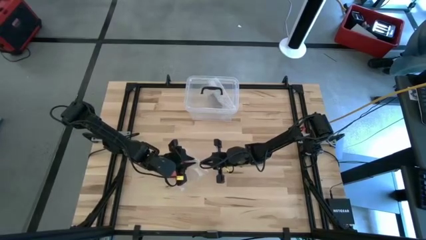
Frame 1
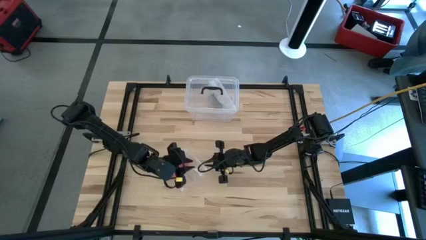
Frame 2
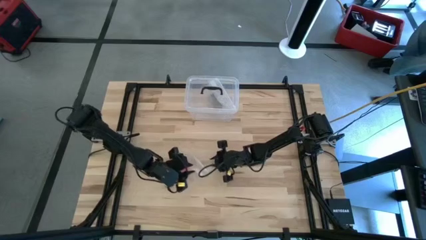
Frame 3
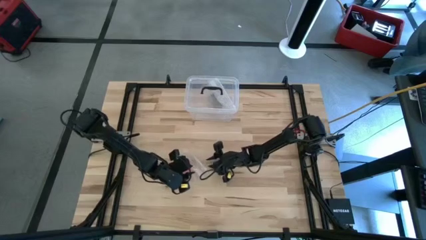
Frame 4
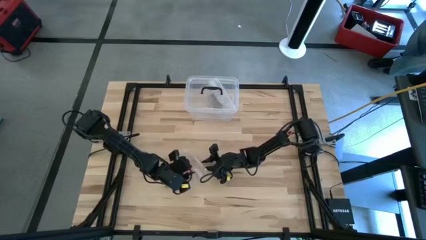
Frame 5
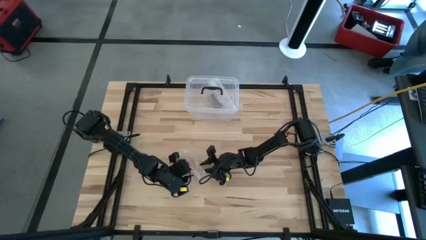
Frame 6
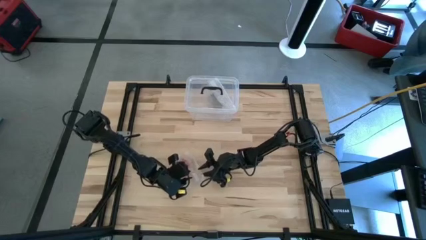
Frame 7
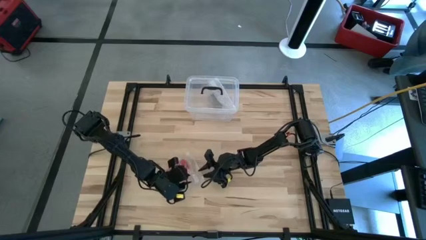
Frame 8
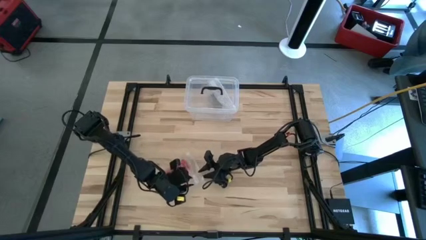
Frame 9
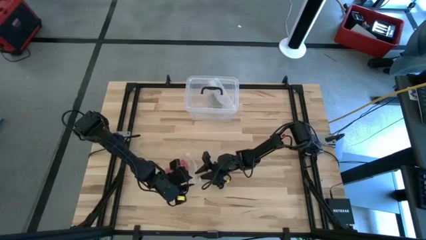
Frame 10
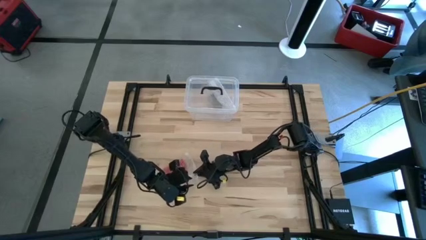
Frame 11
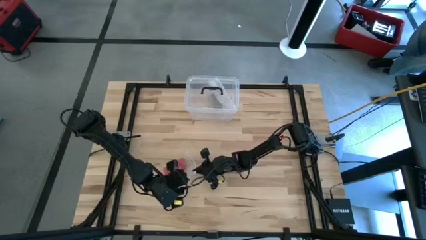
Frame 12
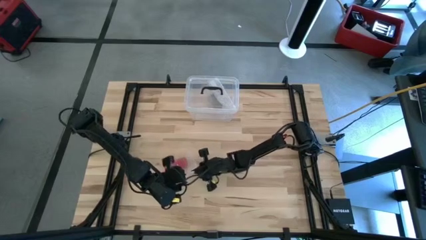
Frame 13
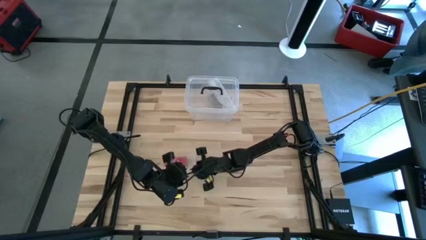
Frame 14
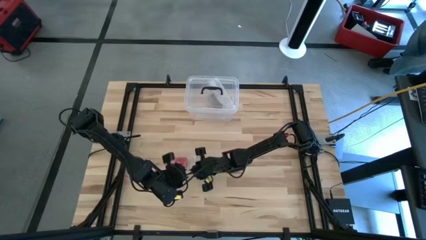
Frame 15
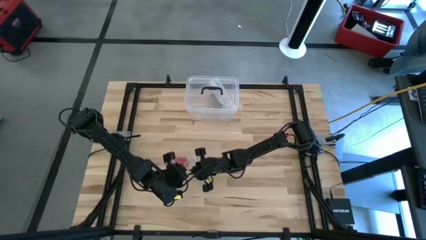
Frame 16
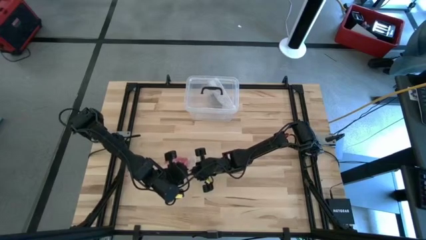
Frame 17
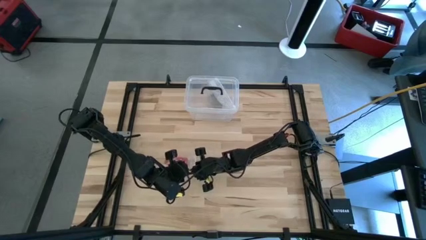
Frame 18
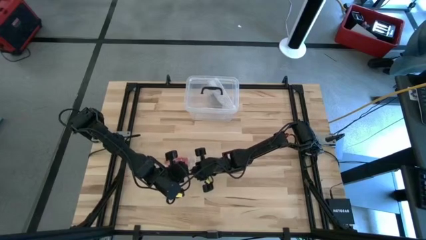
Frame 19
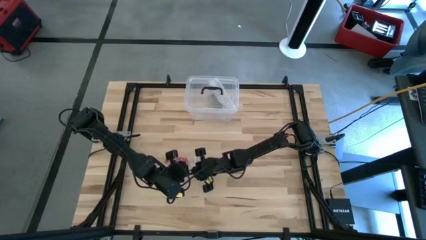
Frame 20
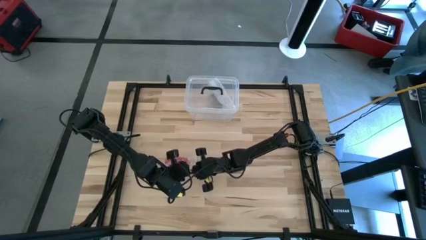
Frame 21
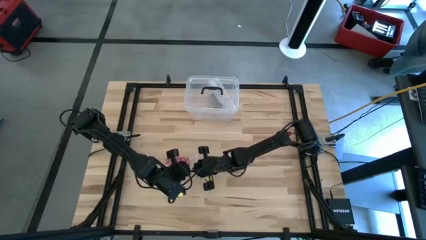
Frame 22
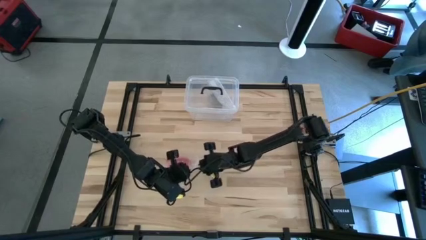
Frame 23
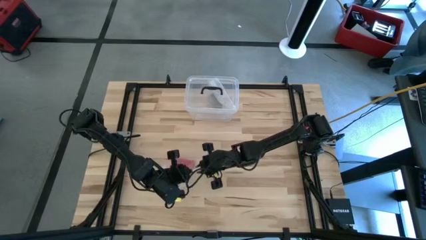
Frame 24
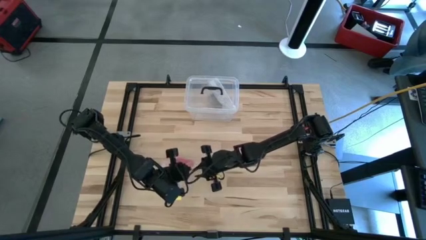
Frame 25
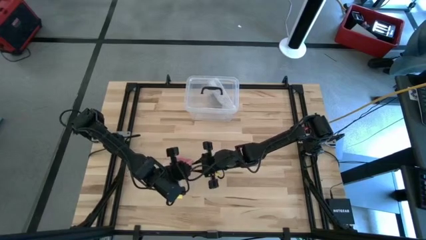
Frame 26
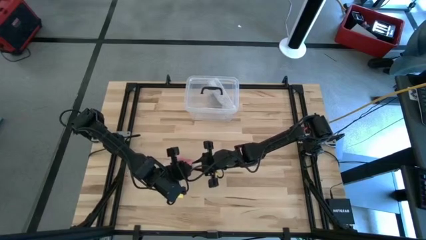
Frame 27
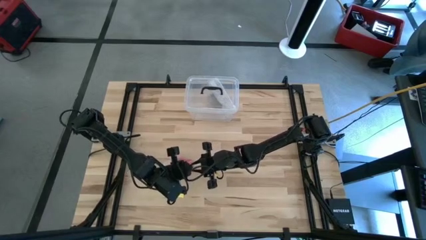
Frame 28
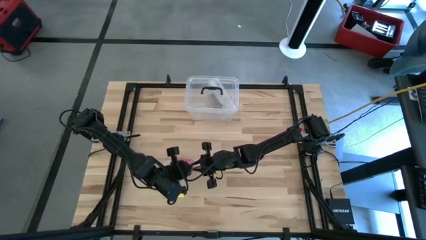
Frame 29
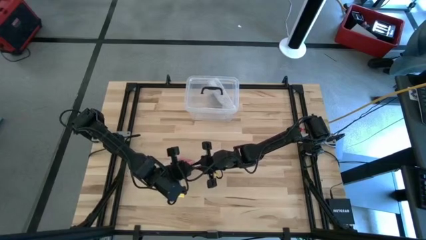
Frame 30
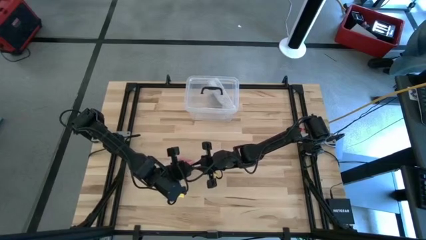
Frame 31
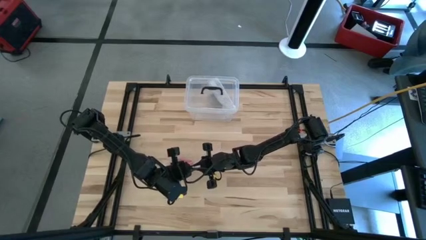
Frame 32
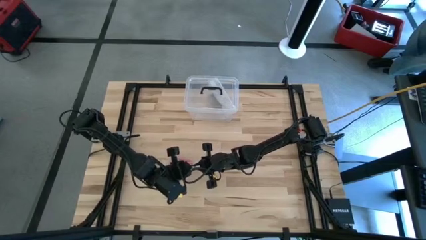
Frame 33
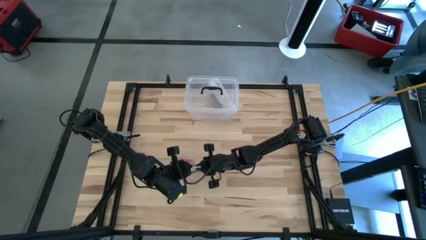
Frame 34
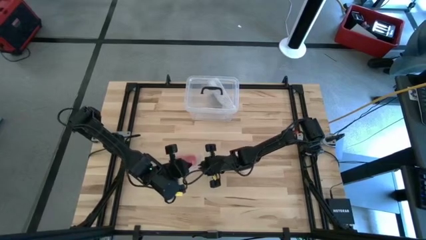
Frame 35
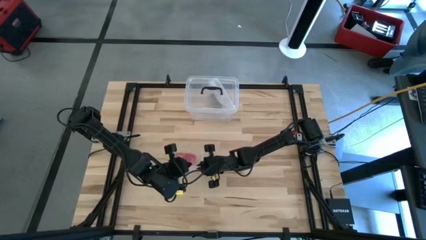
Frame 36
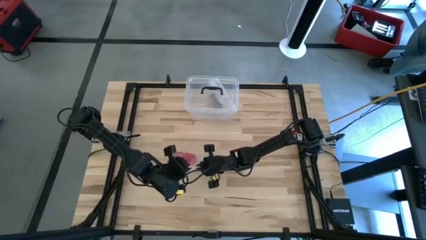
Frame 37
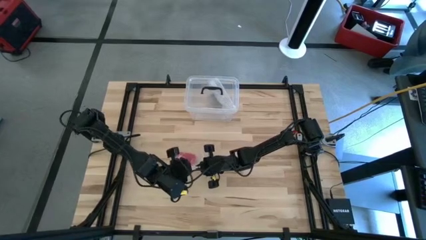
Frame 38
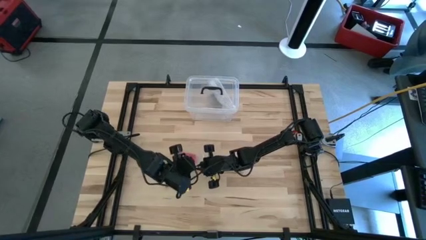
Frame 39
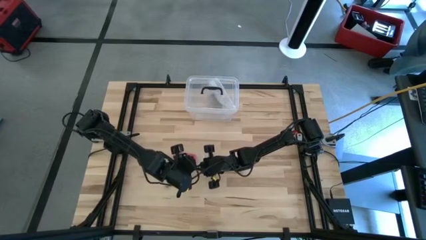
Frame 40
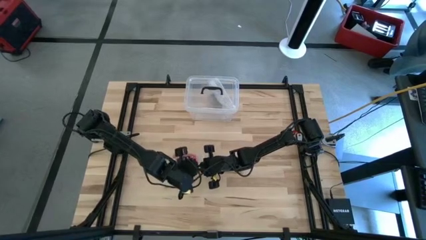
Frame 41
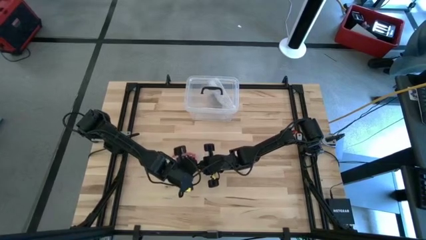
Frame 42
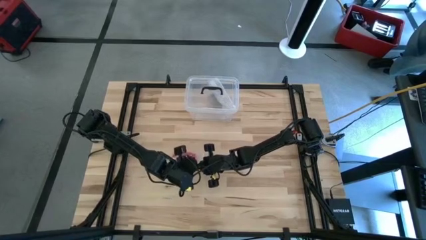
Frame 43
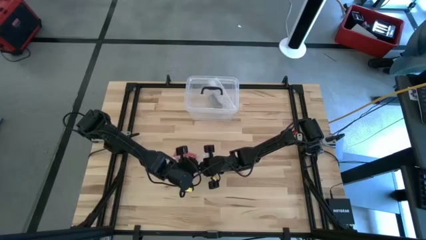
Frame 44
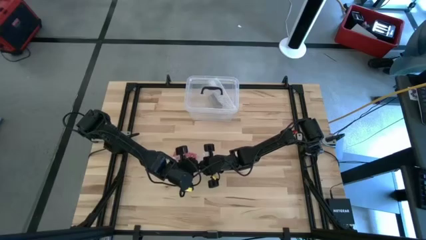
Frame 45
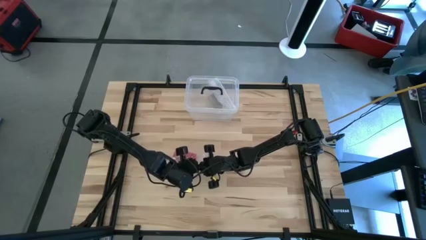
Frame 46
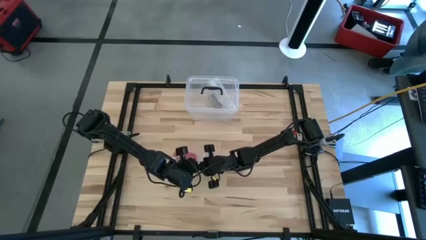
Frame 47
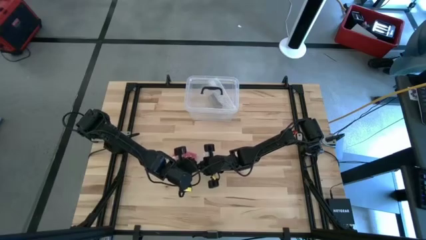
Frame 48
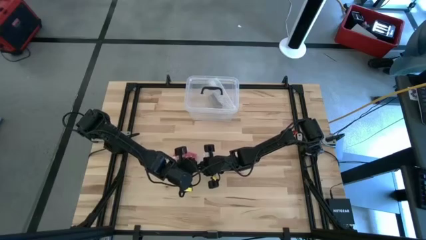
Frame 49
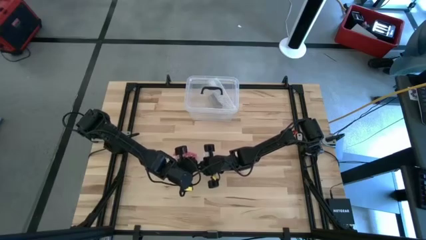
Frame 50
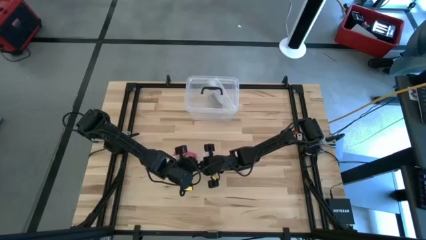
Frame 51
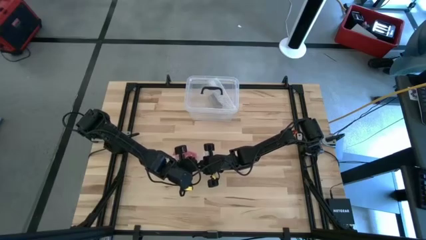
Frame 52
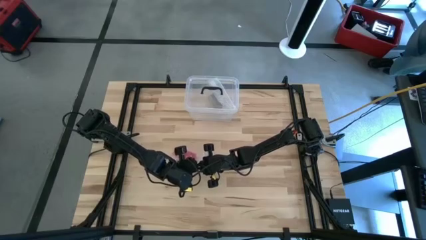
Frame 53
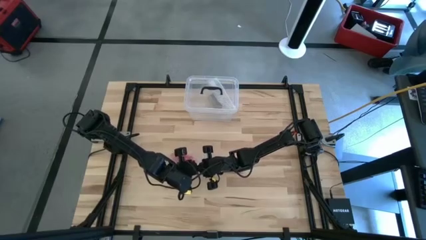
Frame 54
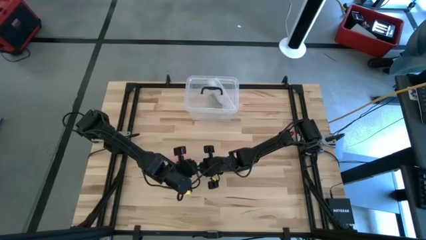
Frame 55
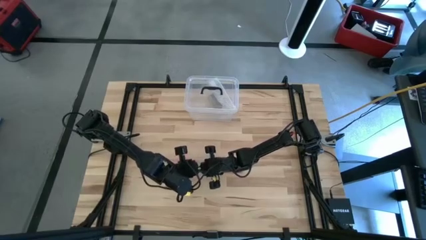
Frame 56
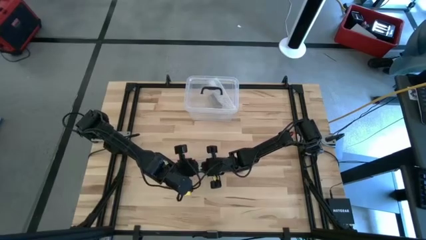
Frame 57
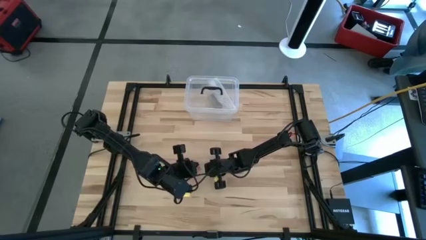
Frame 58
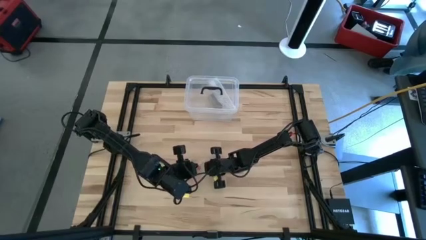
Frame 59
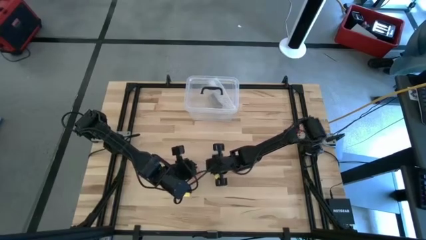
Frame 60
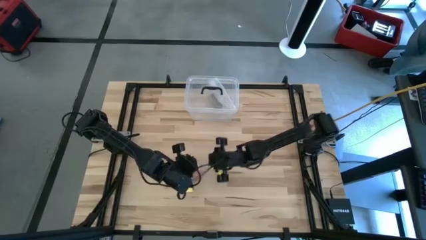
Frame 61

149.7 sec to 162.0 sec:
Task: Roll bandage
Close the transparent zip bag

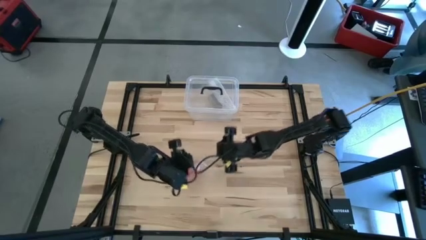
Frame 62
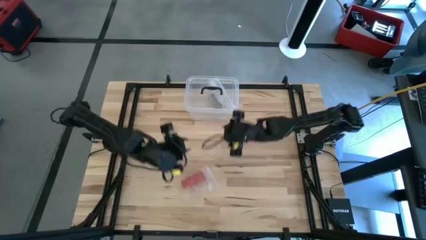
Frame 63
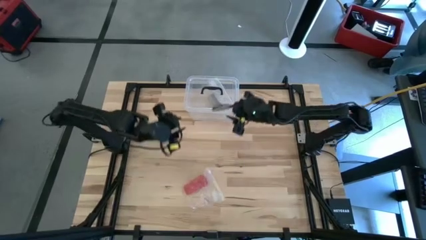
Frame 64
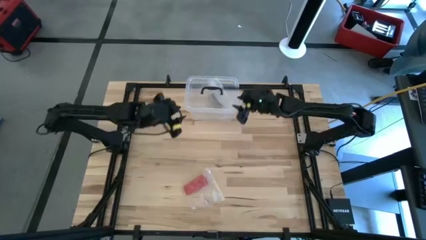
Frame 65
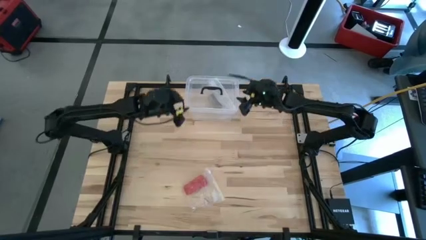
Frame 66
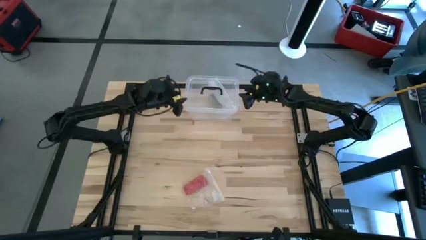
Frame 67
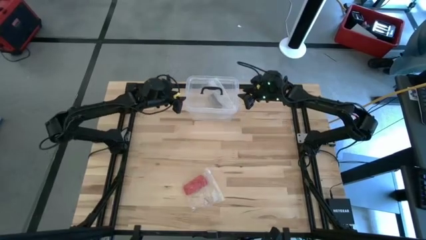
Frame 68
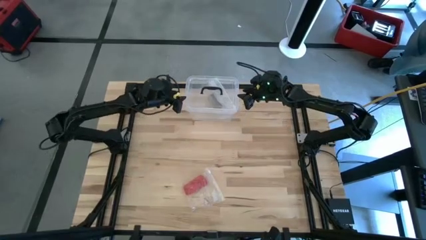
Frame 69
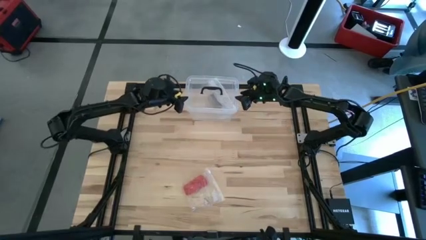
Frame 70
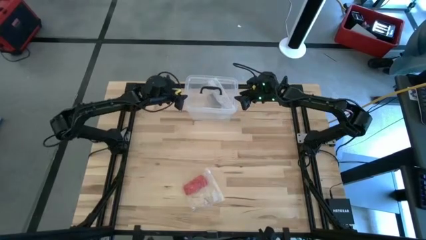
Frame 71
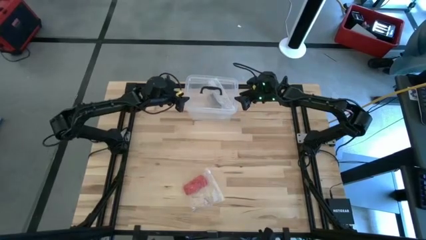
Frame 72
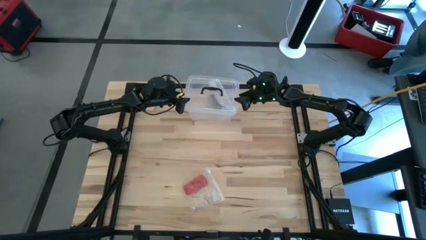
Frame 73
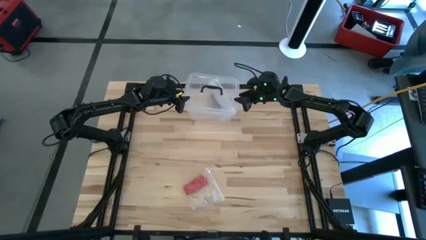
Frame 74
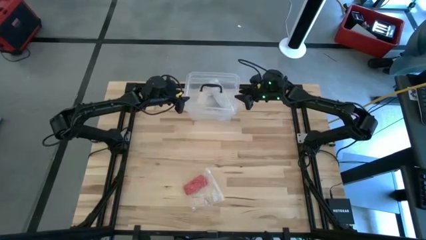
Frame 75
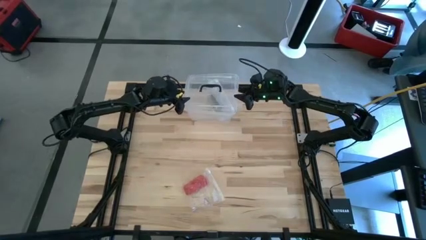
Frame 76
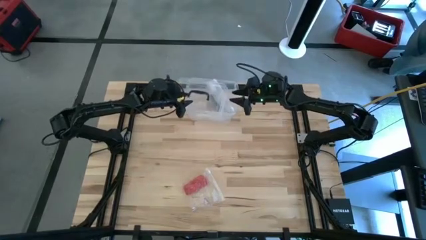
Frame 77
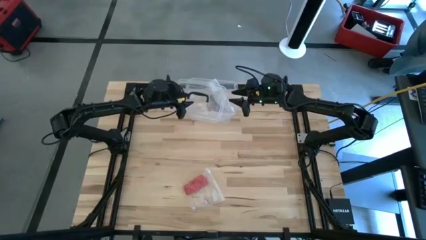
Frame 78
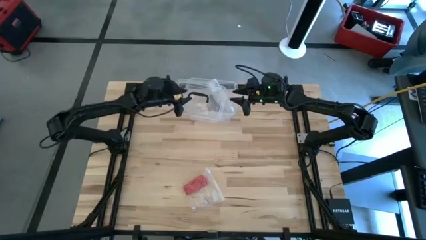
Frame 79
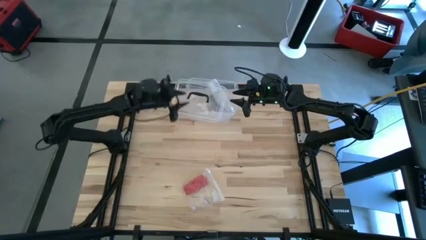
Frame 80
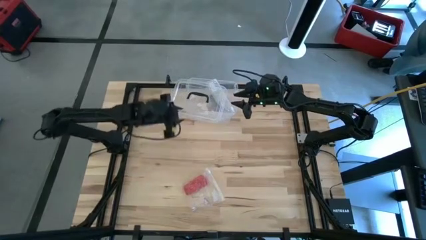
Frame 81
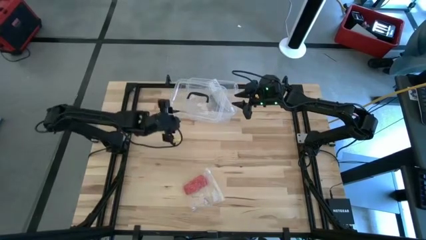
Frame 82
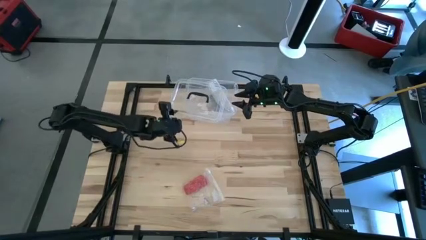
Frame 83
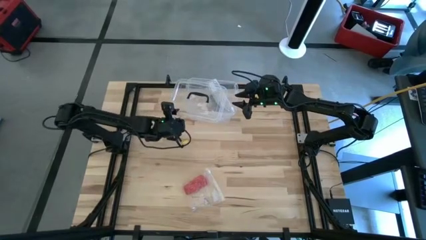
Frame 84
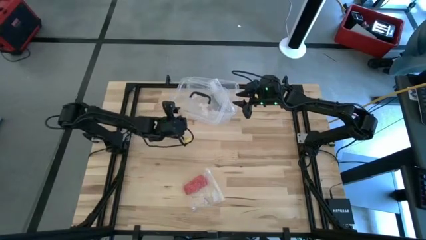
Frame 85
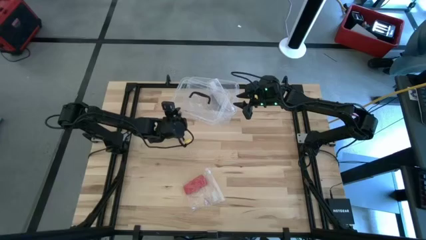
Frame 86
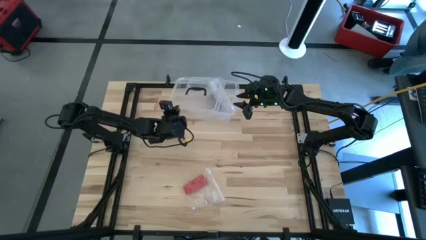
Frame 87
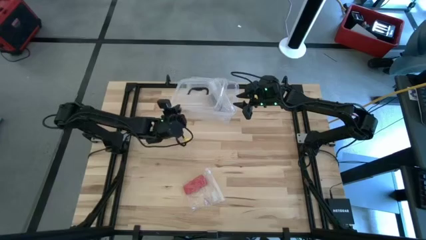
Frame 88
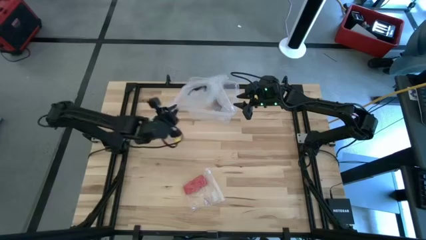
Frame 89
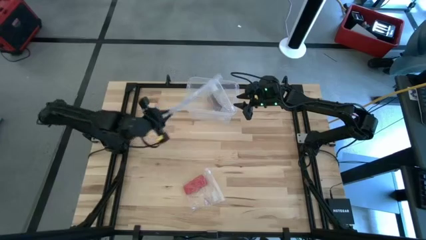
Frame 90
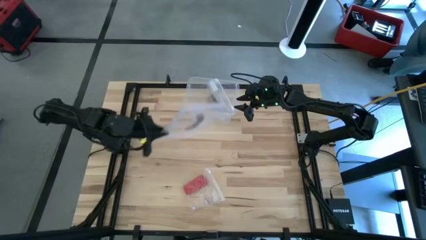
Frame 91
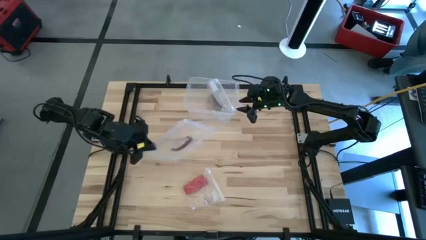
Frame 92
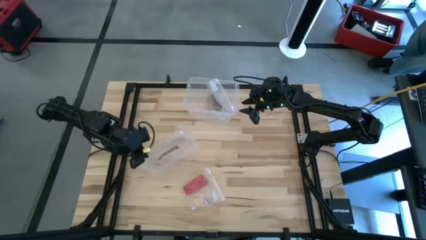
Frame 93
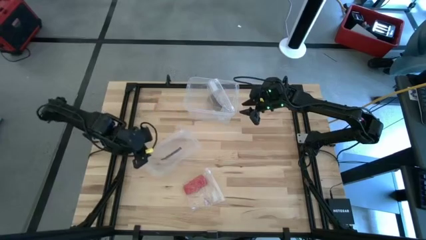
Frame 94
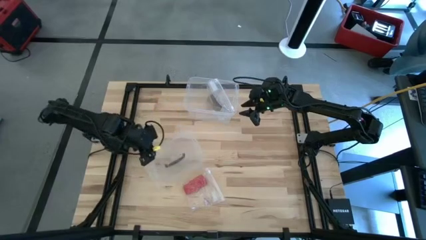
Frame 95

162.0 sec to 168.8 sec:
Remove the lid of the container
